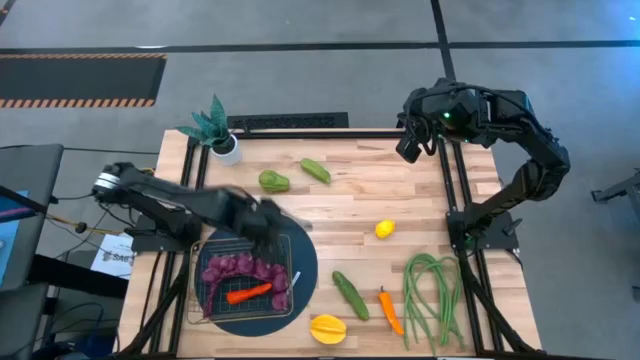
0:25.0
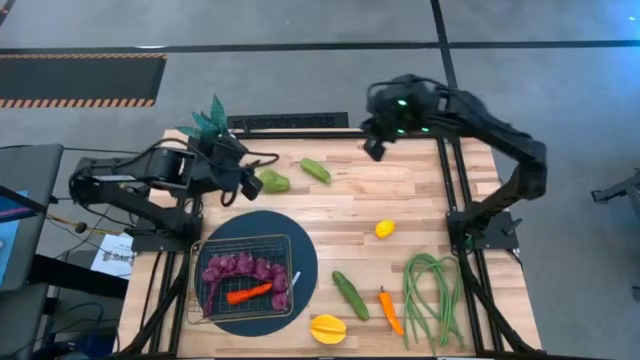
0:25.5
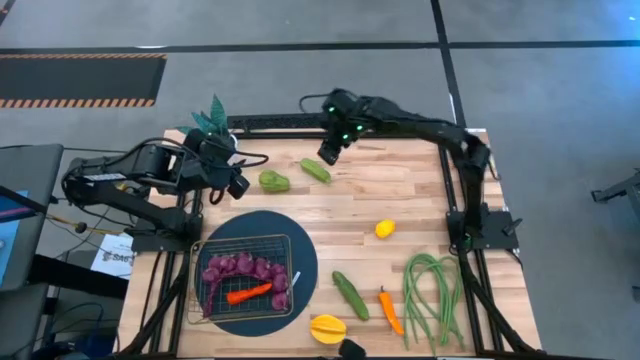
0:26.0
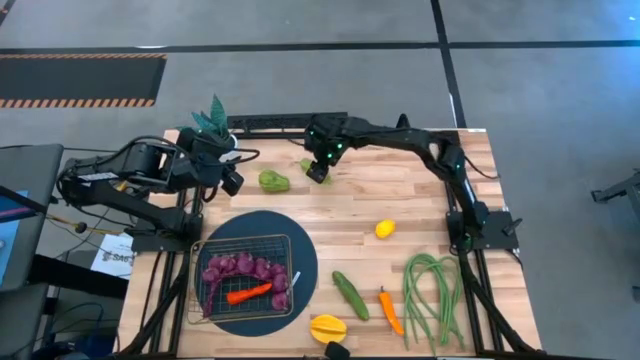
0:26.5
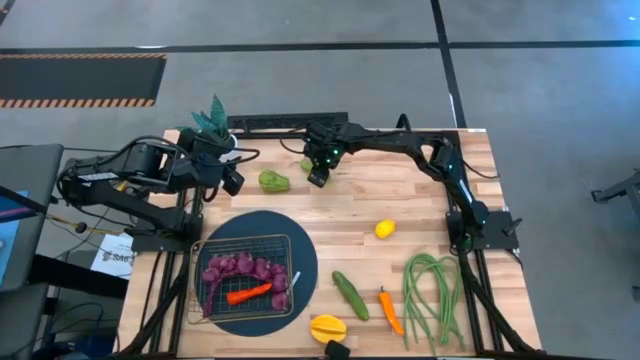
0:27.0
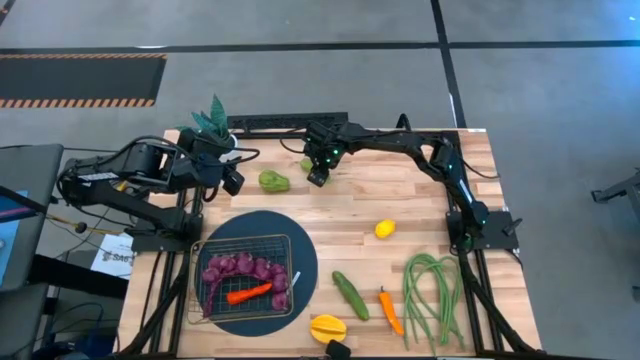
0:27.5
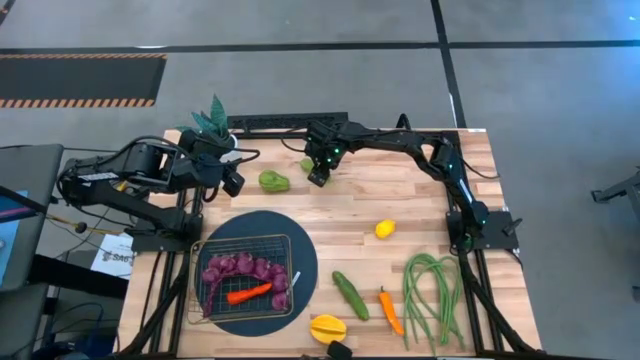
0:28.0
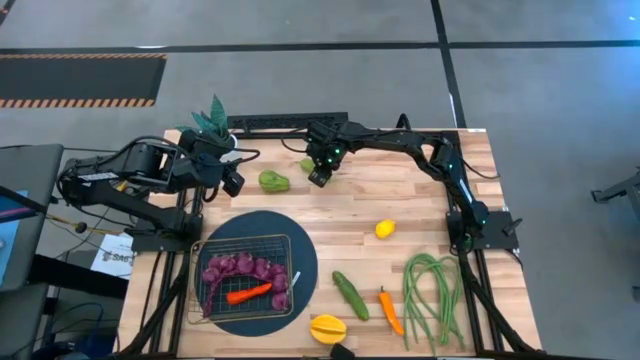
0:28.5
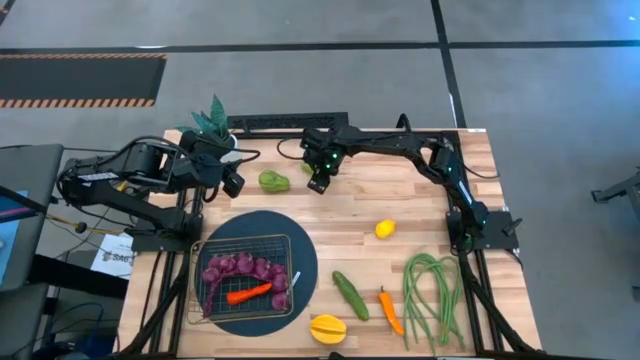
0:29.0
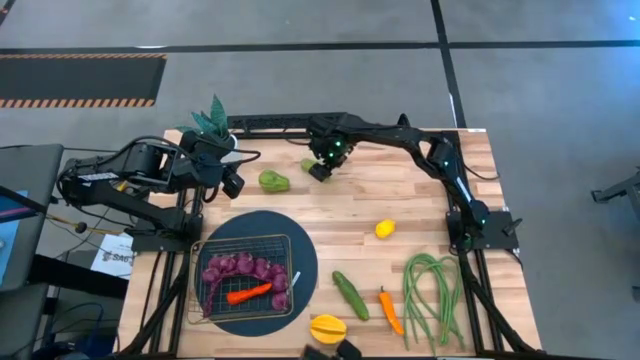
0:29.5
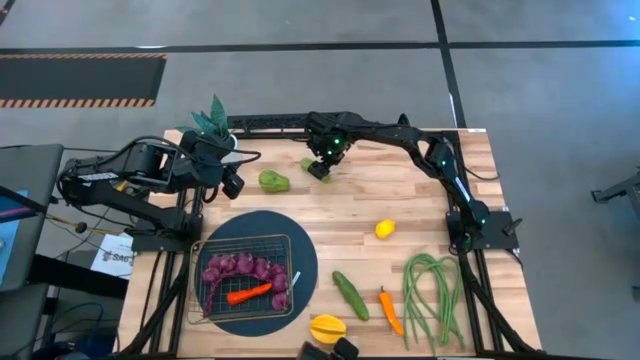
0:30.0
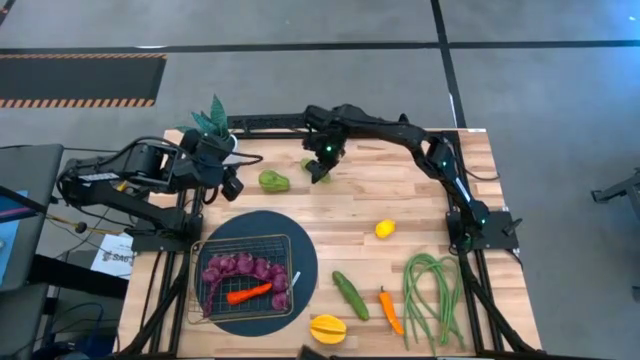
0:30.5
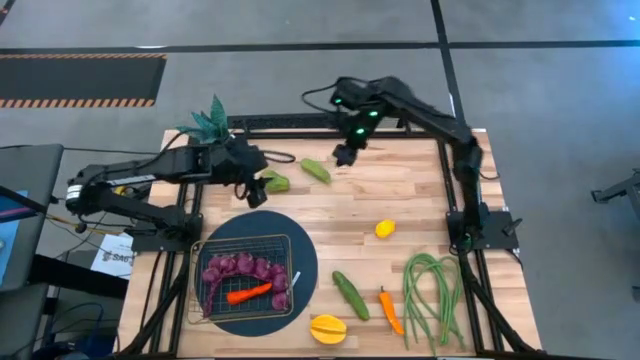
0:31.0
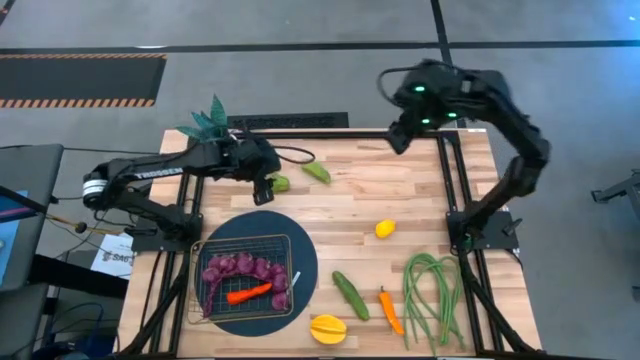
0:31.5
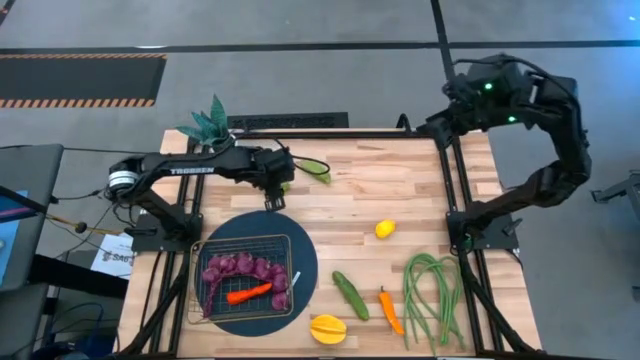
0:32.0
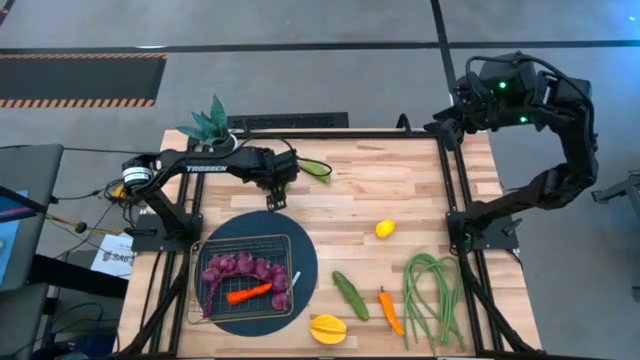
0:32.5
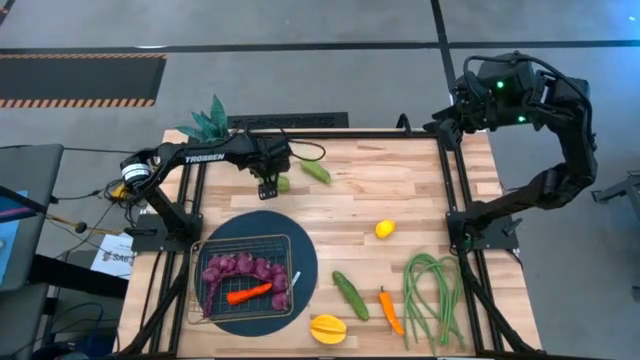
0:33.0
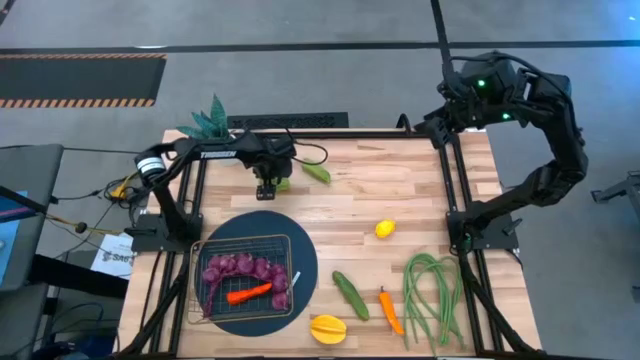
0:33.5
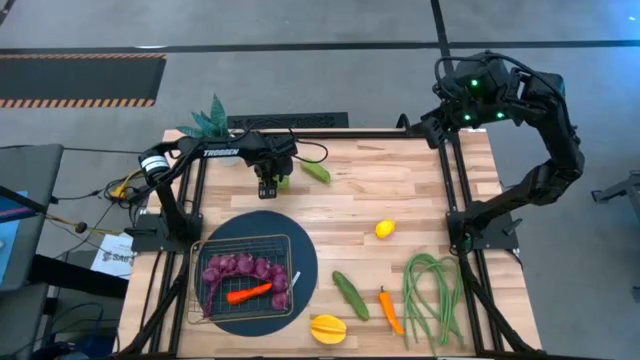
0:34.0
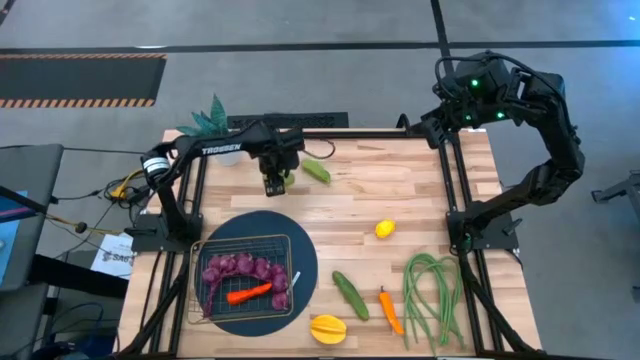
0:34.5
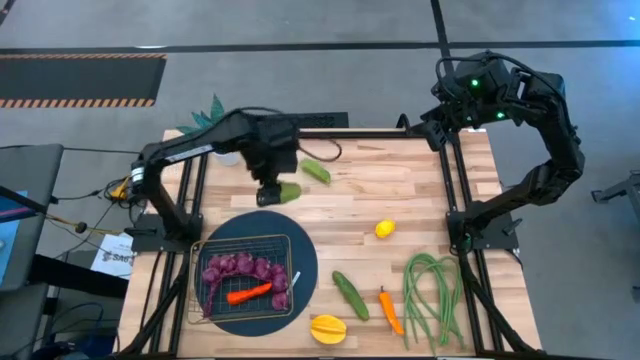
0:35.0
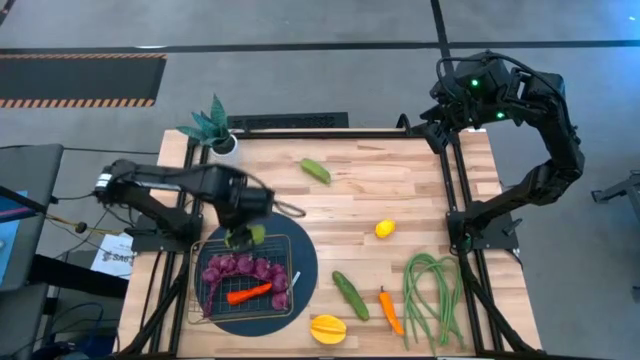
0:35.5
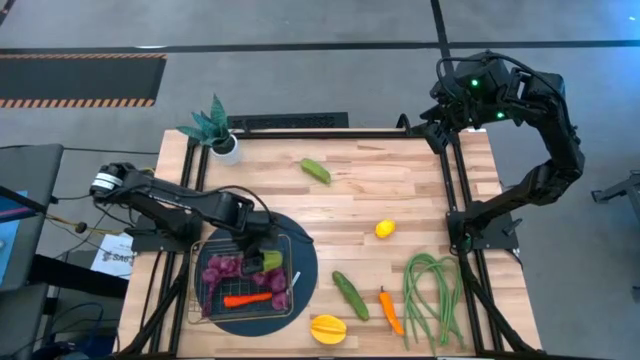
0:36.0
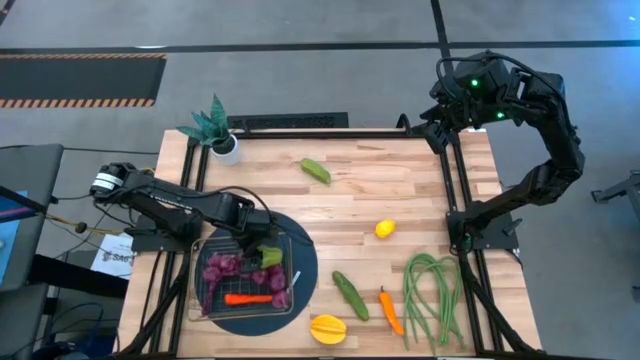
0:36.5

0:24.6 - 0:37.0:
Task: Build produce basket
Put the green chayote into the wire basket

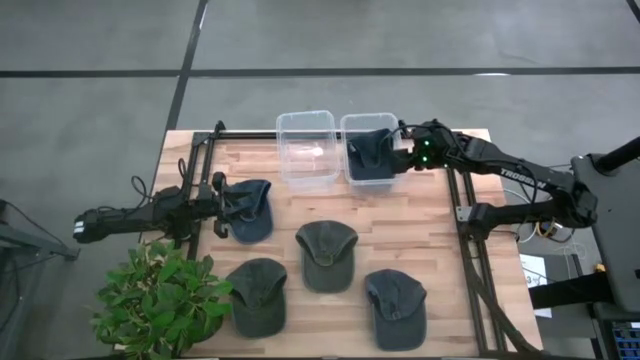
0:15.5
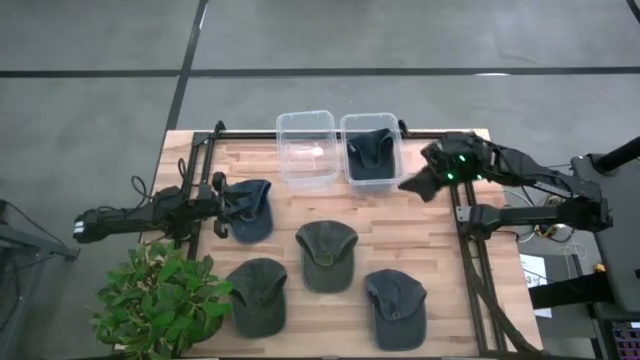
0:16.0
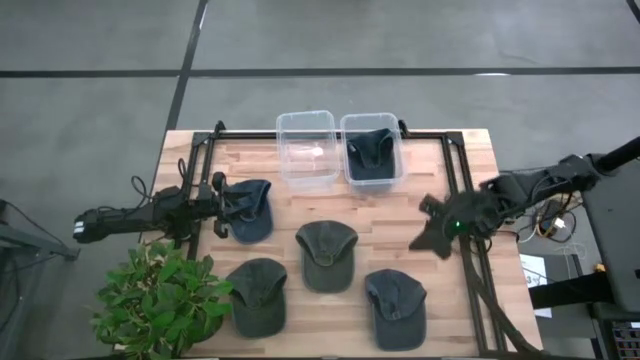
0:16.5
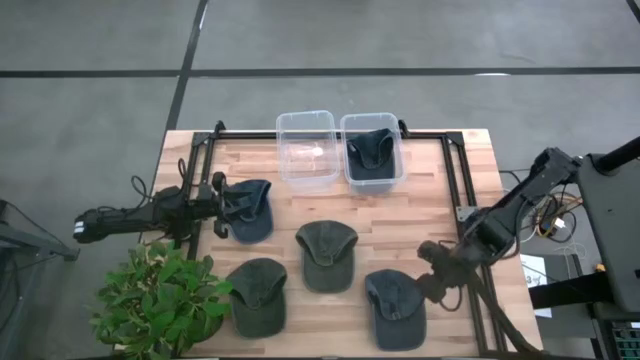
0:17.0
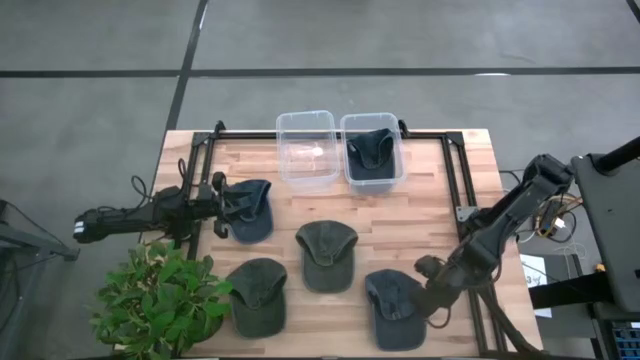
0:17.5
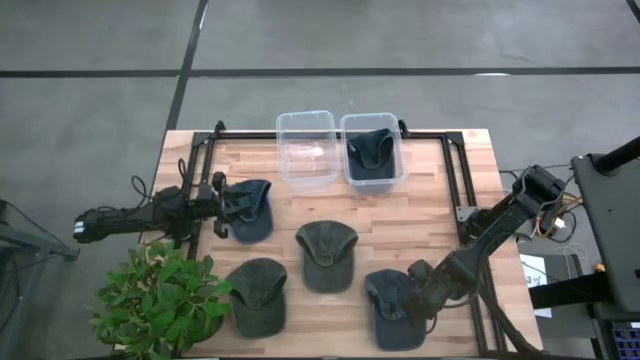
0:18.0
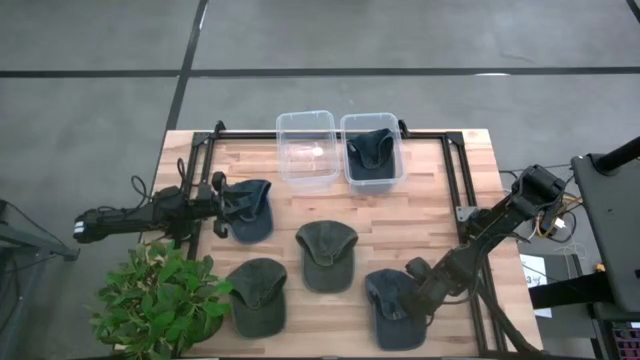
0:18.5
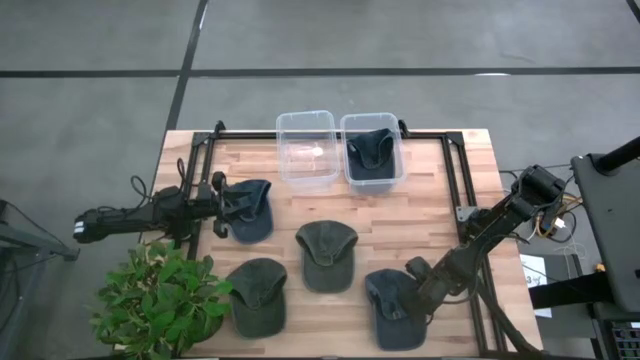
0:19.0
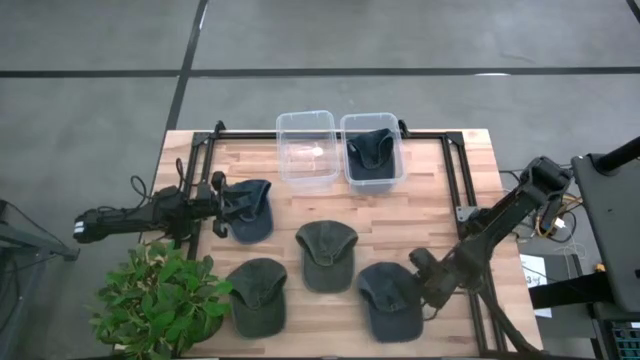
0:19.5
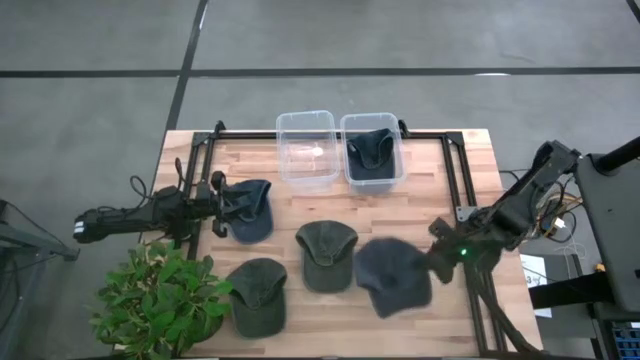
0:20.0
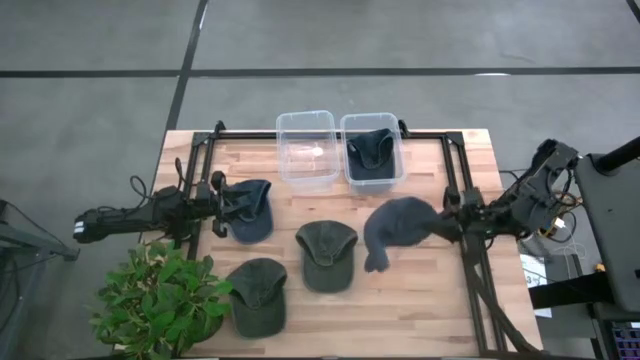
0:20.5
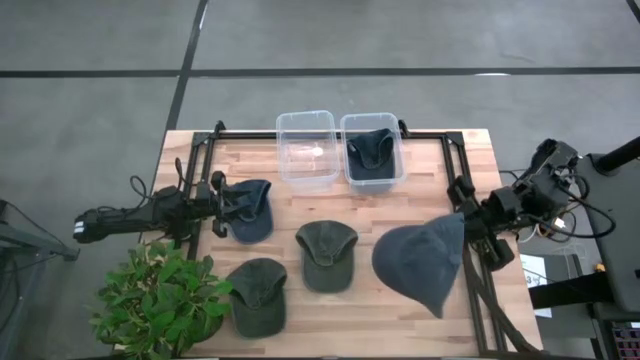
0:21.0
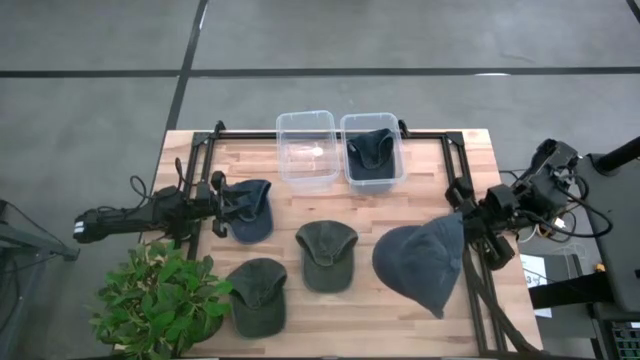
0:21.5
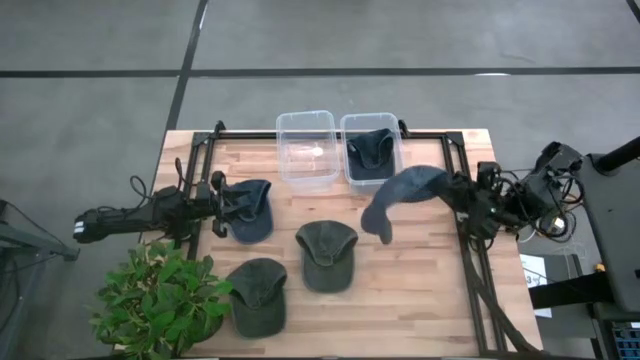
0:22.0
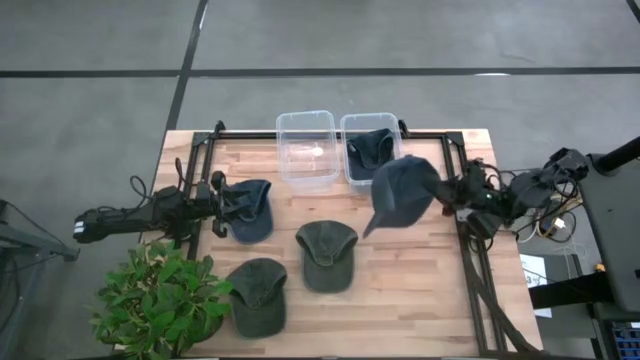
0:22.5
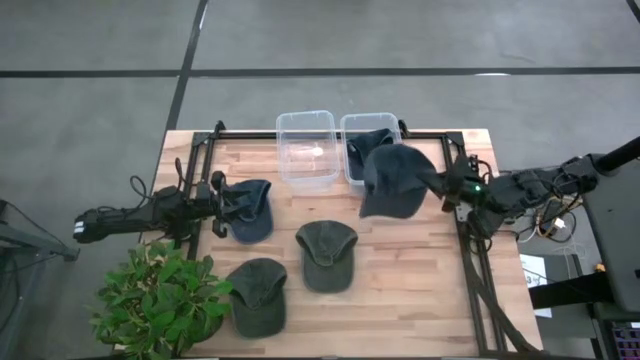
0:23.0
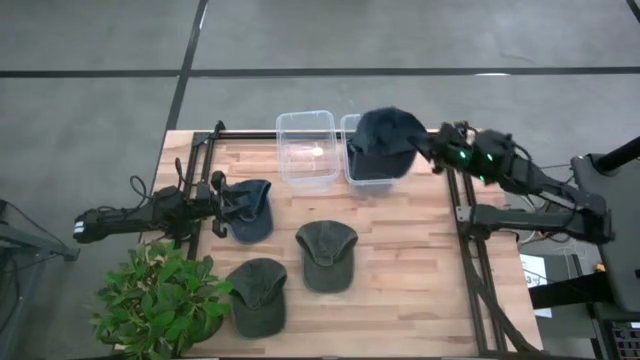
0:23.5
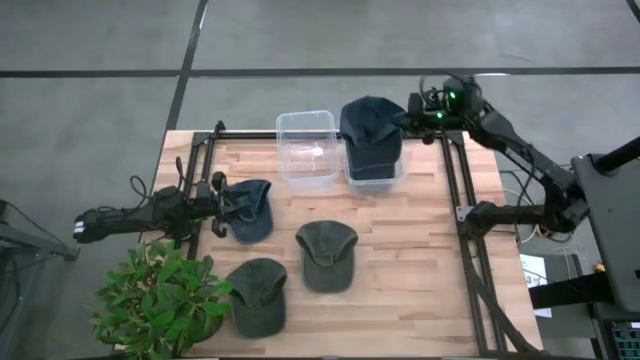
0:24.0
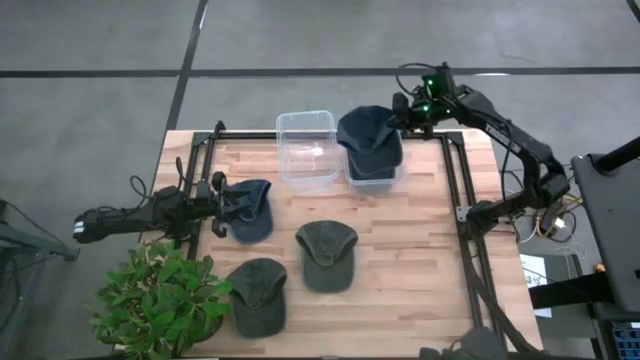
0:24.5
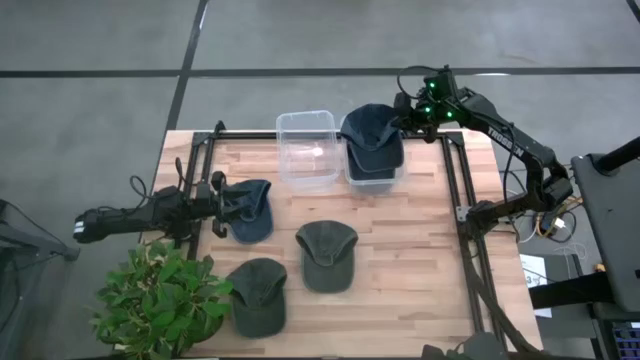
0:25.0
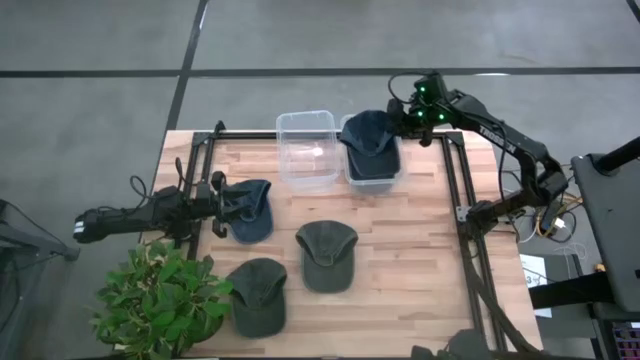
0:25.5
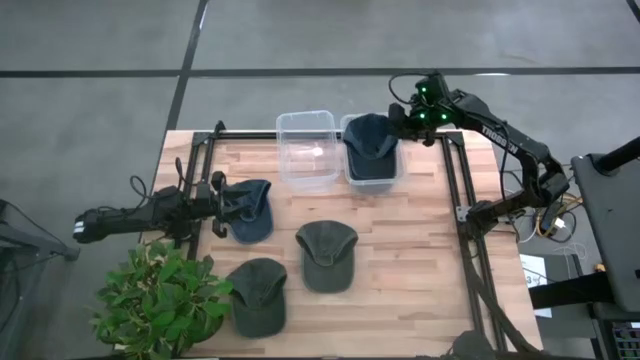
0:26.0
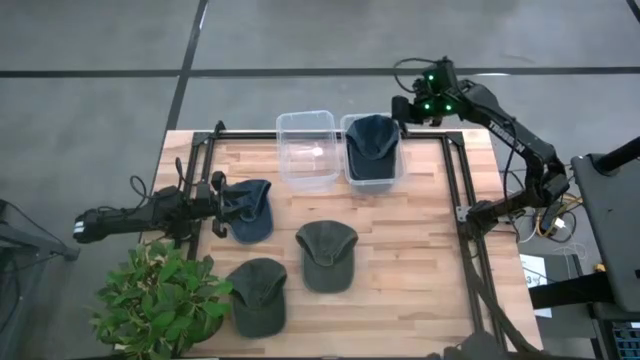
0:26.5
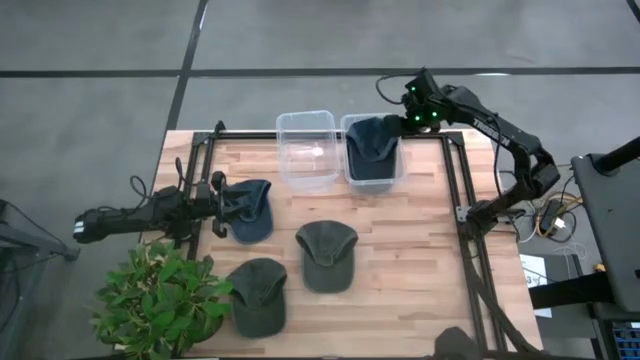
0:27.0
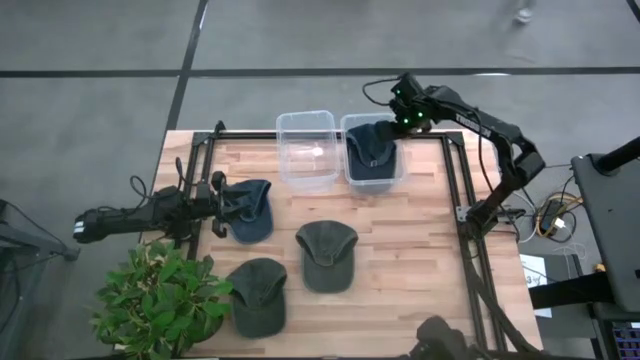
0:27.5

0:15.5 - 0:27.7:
Task: Pick & Place hat
Put the bottom blue cap into the right transparent bin
